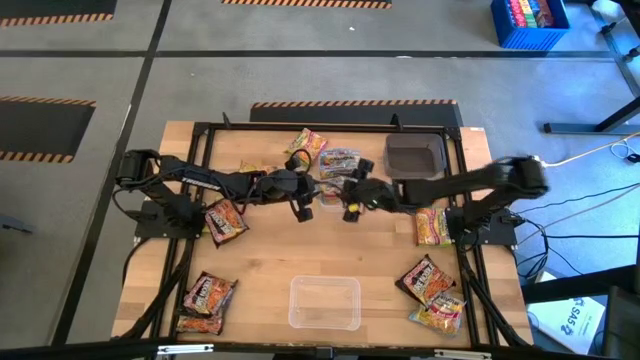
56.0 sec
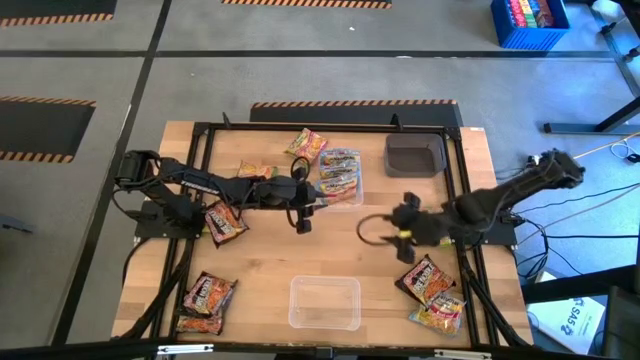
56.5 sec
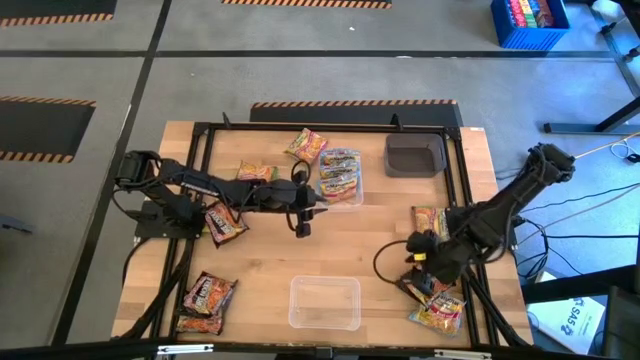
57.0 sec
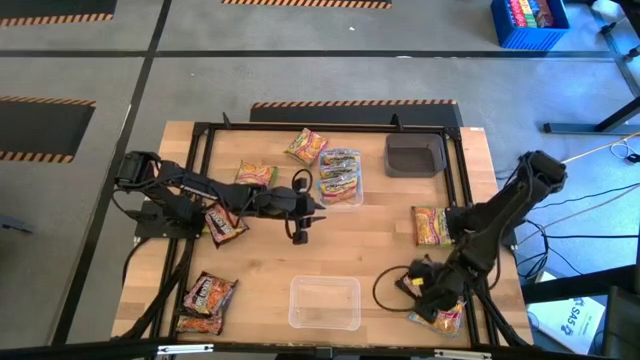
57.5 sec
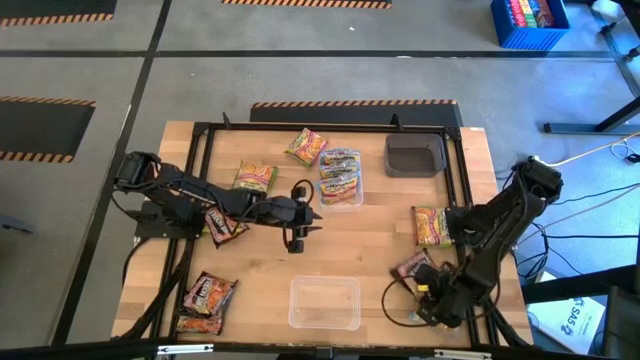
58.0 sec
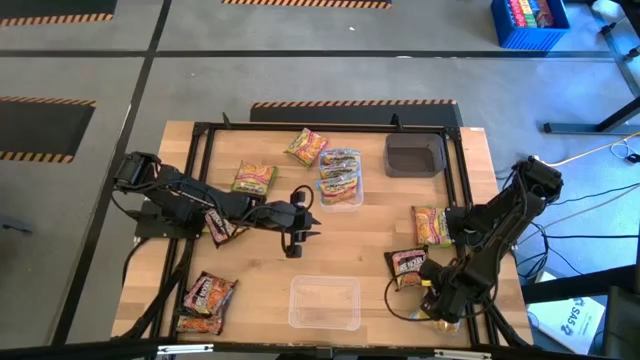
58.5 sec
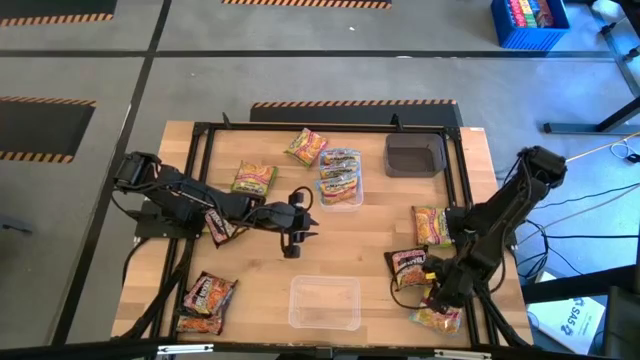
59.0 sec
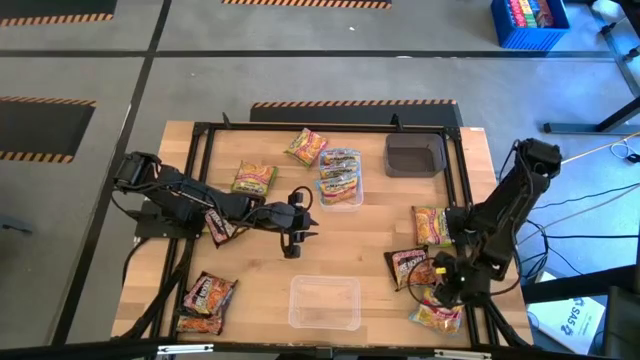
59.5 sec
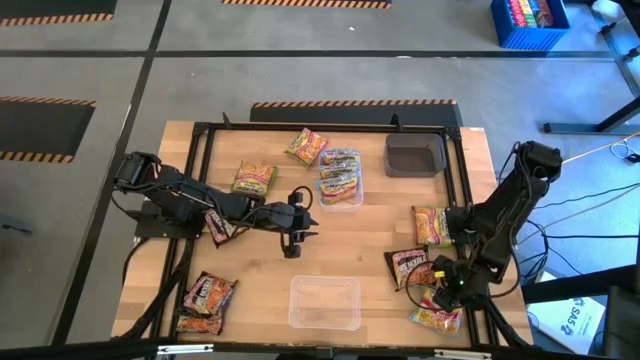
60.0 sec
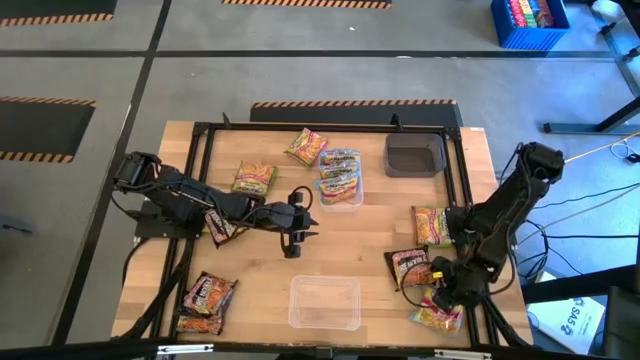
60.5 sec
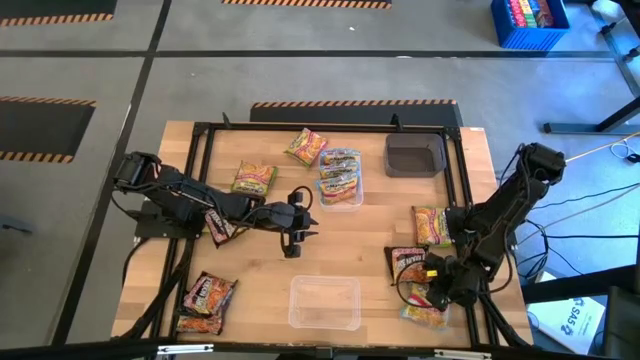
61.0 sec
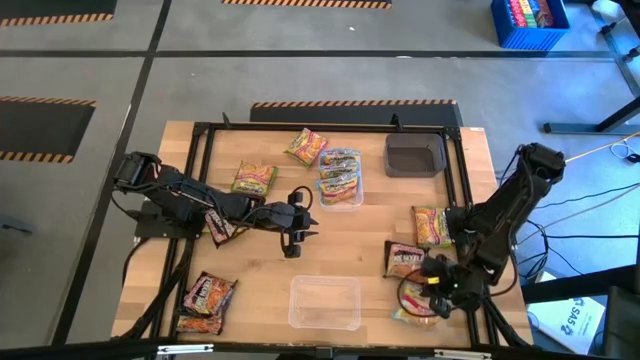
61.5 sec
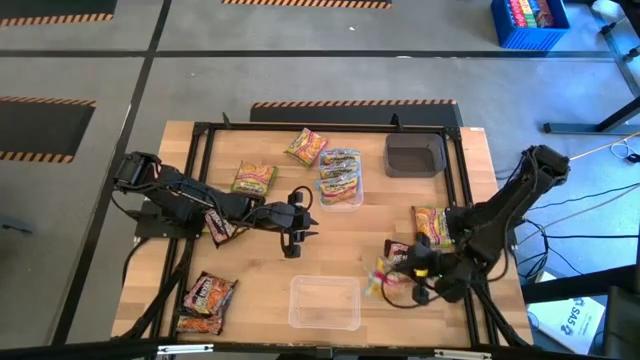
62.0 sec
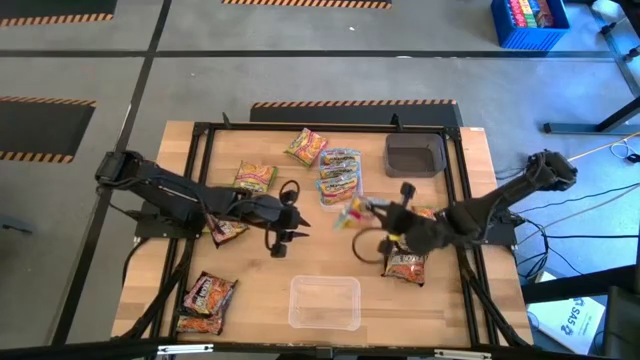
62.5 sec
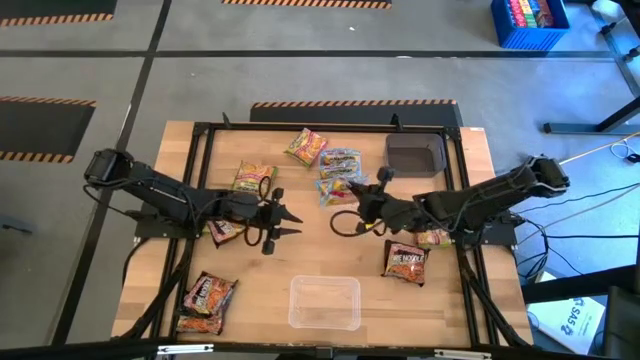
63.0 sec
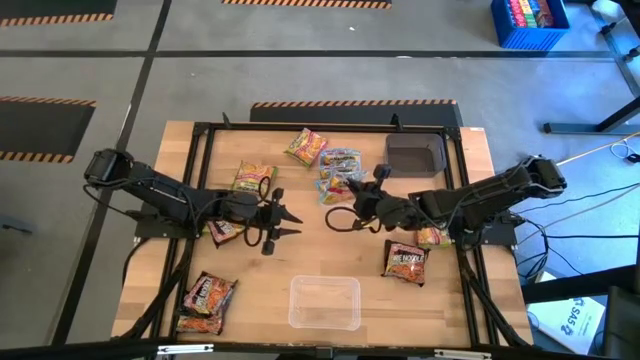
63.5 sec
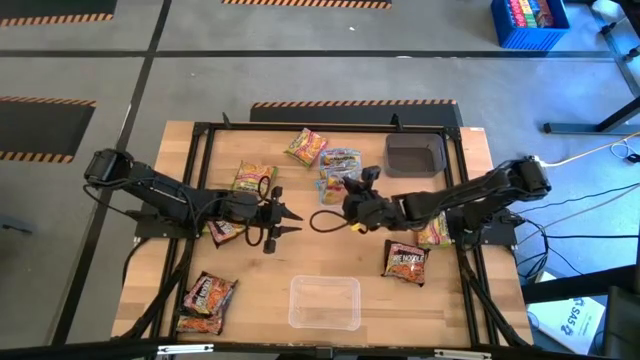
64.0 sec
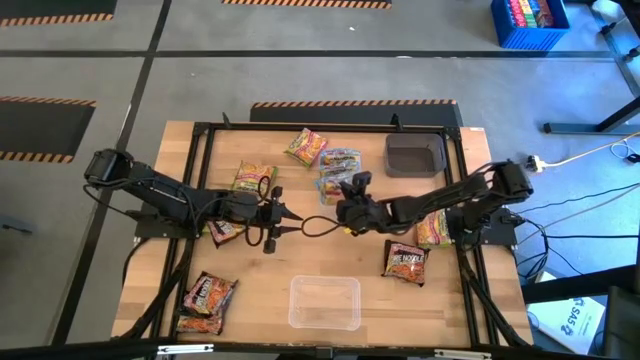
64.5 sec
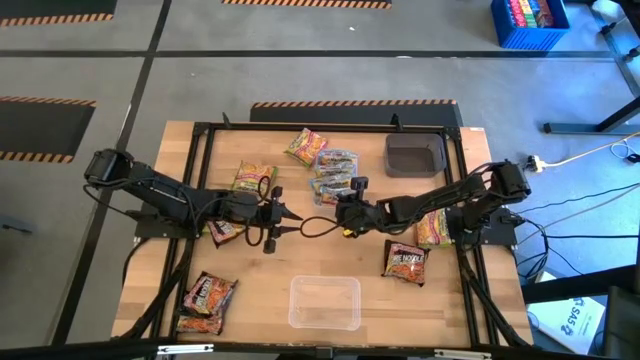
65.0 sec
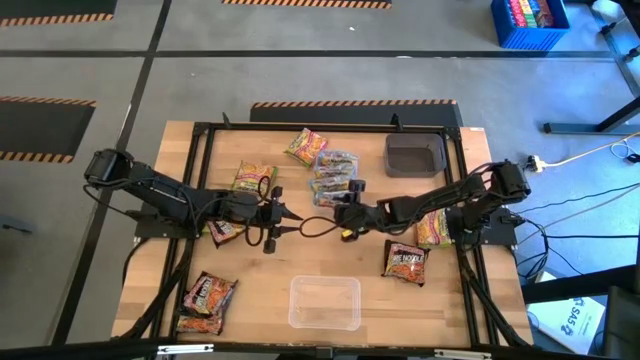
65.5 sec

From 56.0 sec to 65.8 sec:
Task: Sort Maruchan noodles
Put the blue noodle pack into the top transparent bin

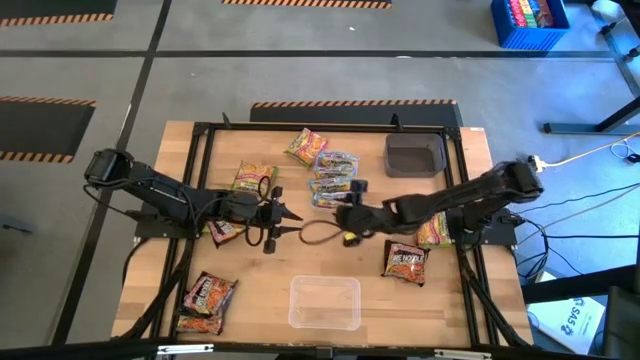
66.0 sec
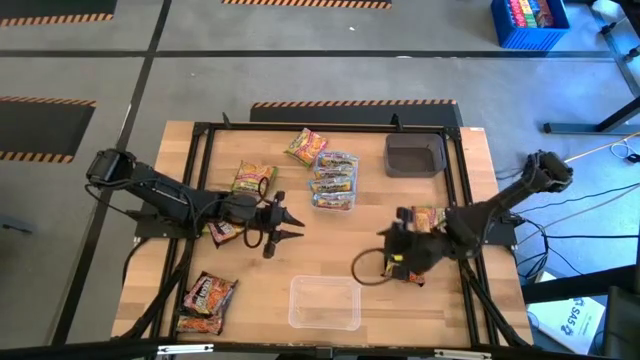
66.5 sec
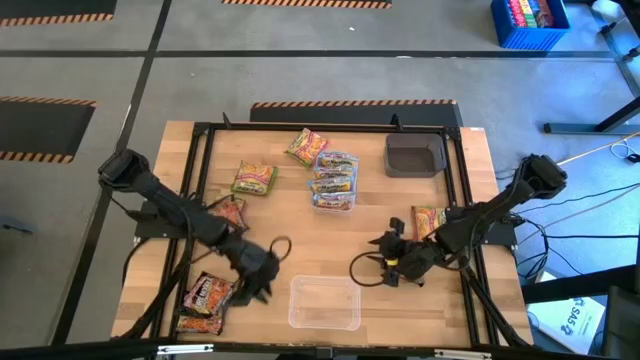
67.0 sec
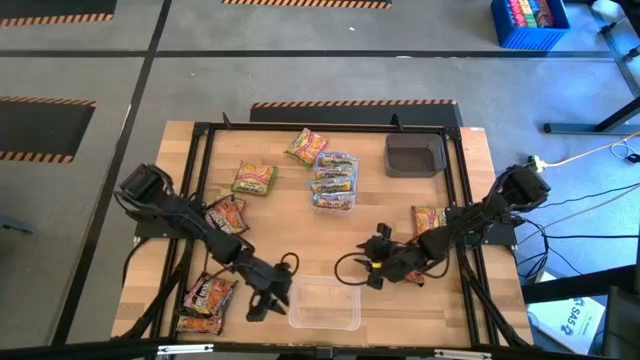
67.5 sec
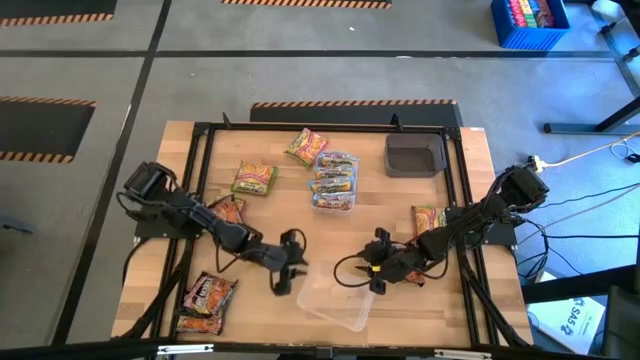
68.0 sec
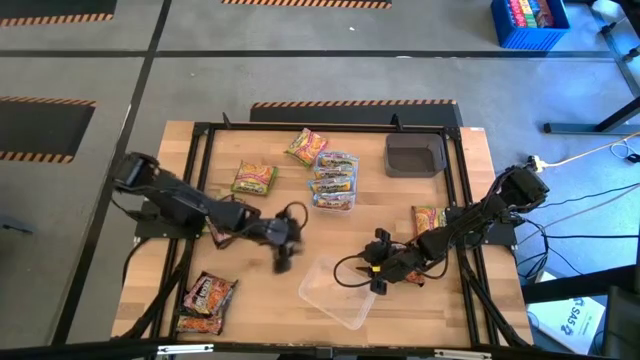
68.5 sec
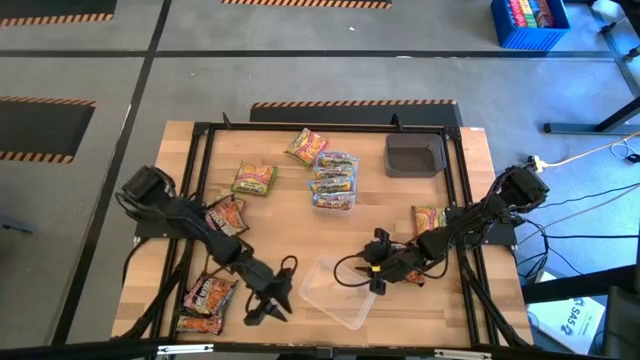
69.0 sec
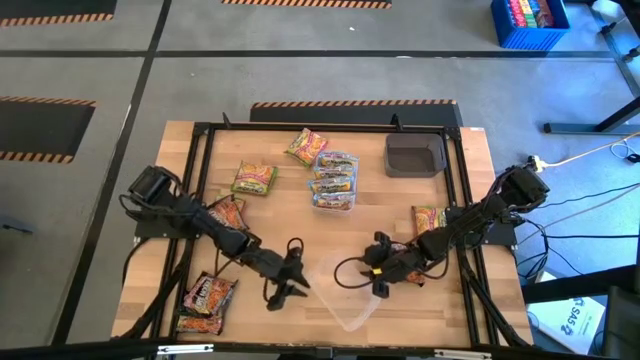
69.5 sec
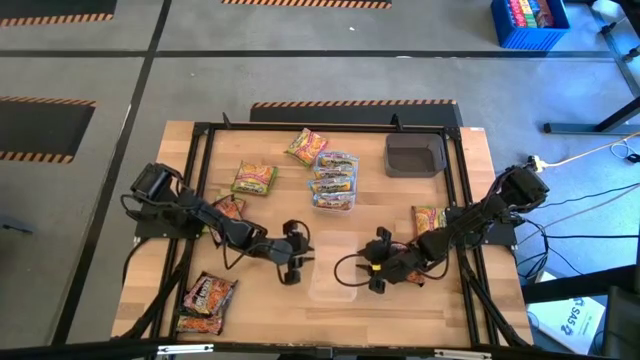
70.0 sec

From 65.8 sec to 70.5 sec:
Move the bottom transparent bin to the centre of the table

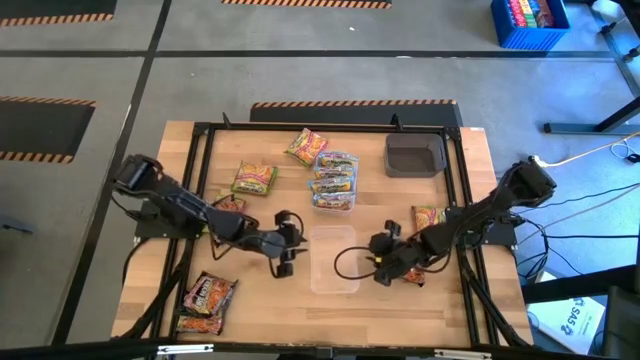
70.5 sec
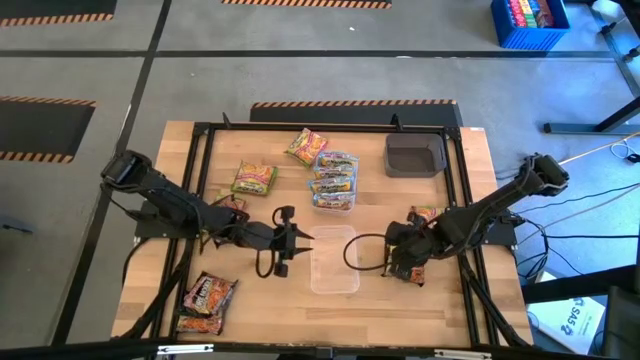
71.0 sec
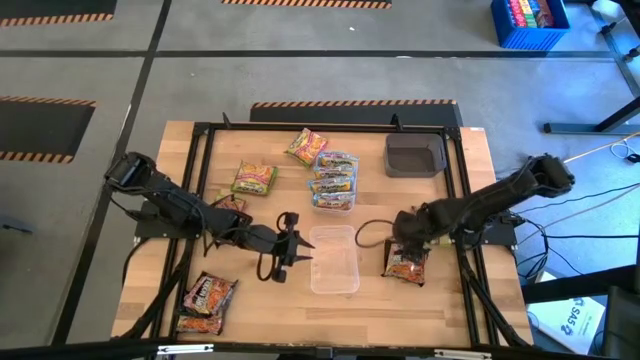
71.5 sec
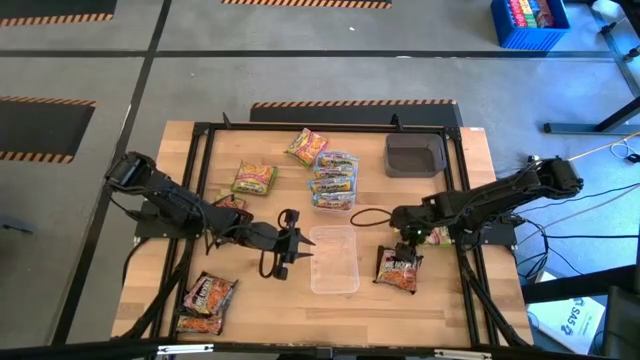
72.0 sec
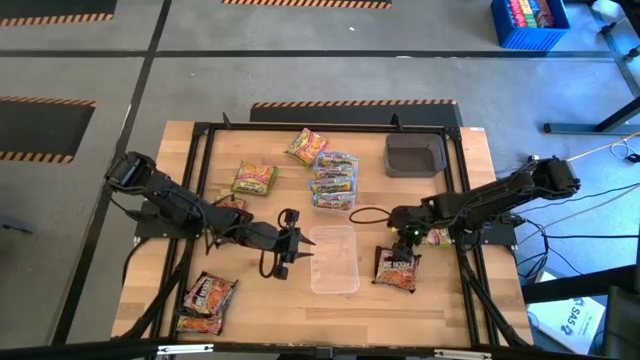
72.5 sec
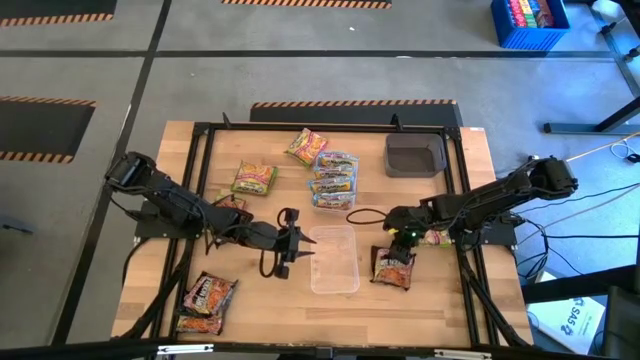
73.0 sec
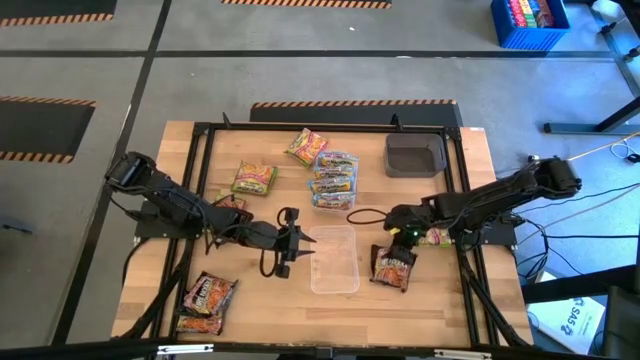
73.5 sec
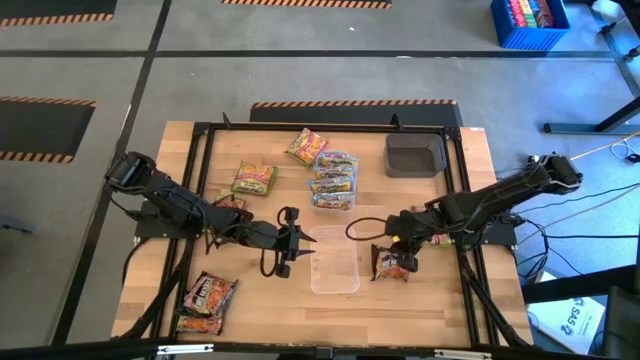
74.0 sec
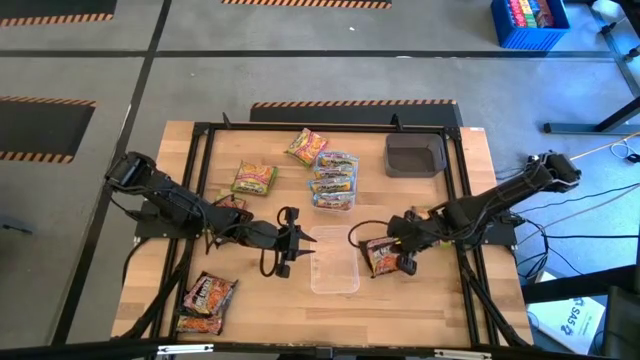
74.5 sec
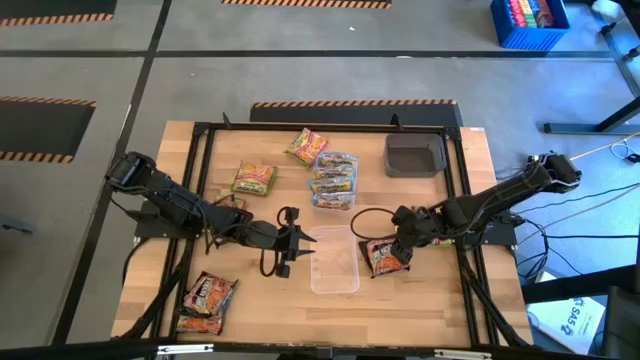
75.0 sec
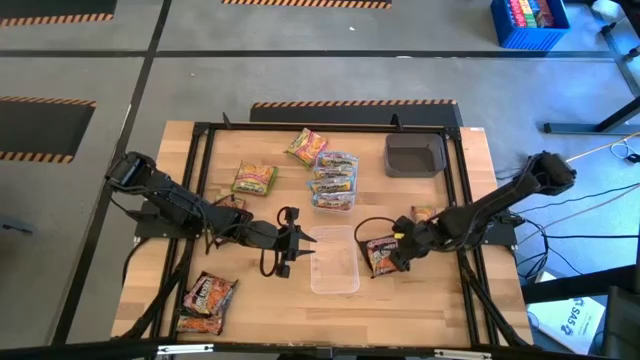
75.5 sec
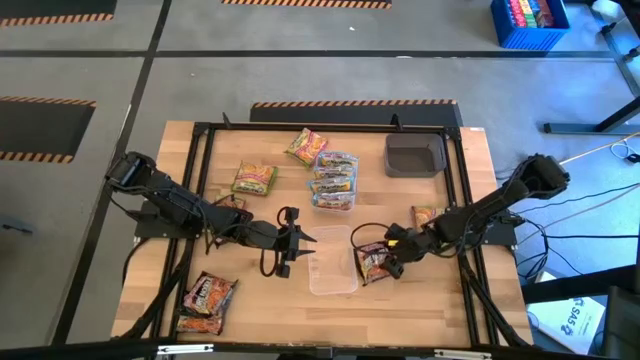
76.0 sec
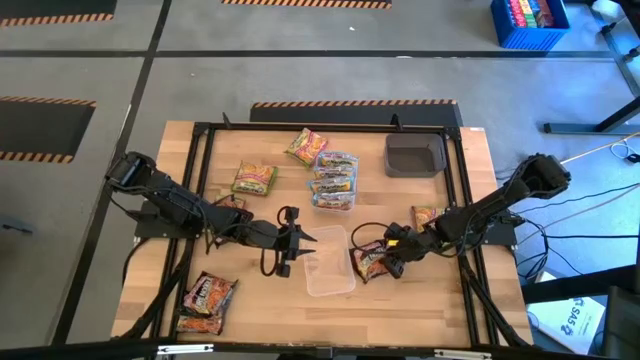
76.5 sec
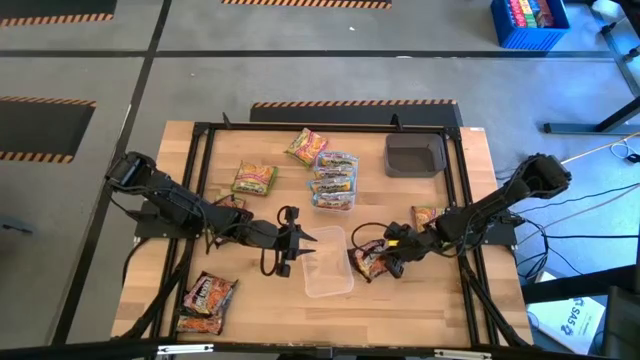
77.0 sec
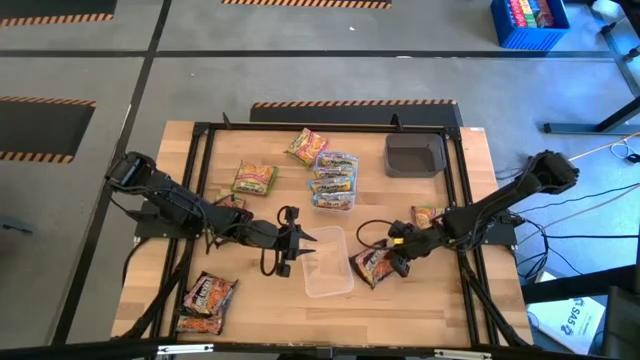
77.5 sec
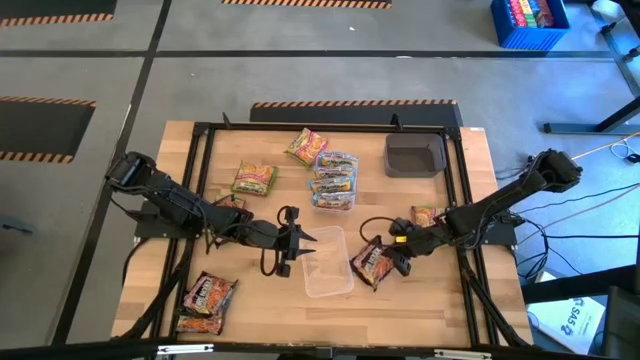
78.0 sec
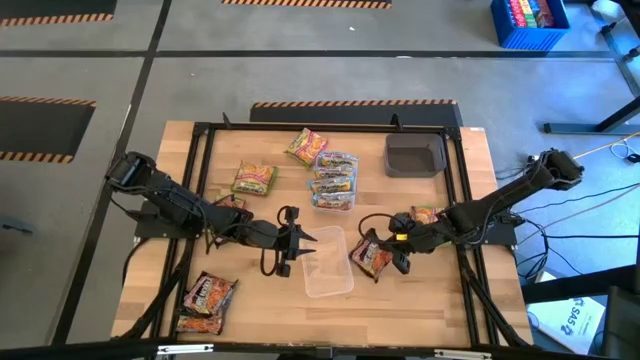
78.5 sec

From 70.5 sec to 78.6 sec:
Put the black noodle pack into the bottom transparent bin
